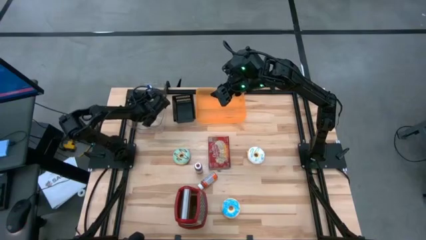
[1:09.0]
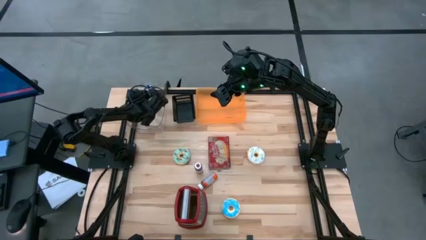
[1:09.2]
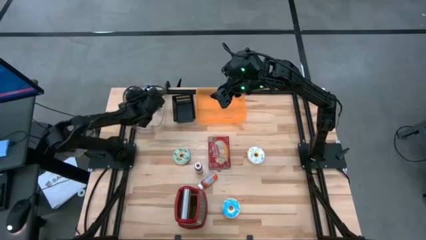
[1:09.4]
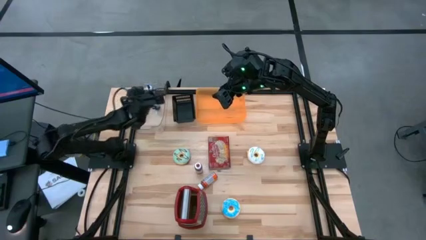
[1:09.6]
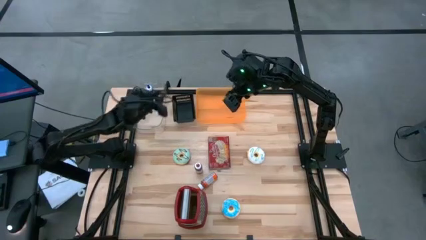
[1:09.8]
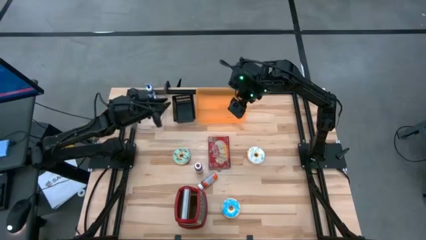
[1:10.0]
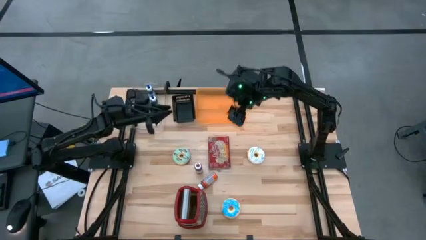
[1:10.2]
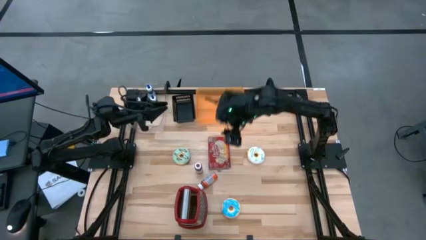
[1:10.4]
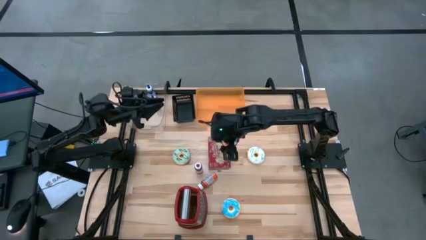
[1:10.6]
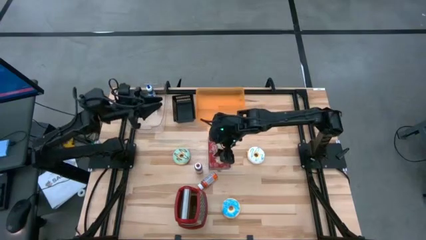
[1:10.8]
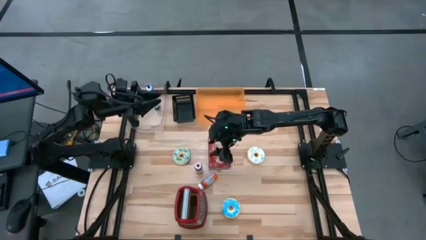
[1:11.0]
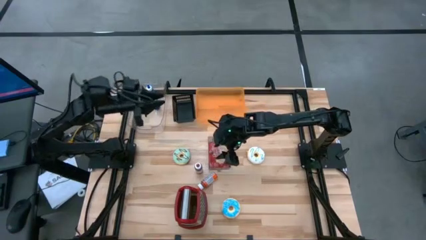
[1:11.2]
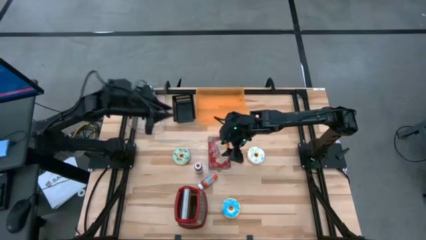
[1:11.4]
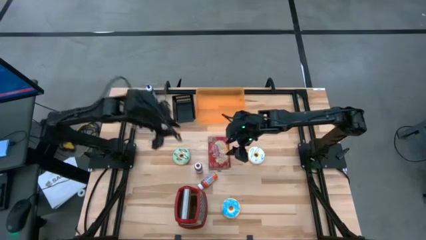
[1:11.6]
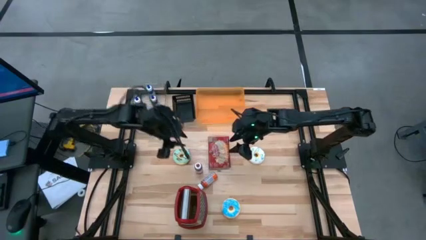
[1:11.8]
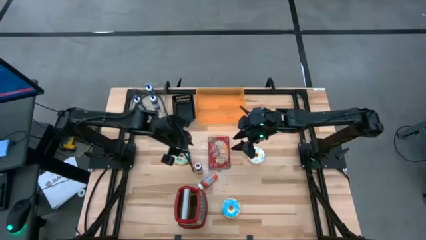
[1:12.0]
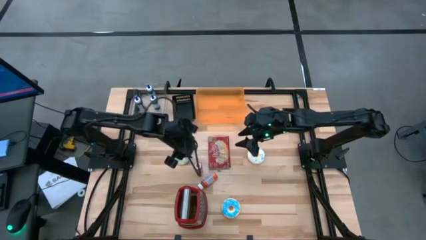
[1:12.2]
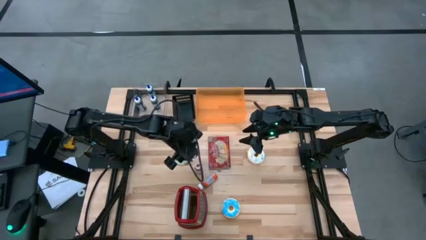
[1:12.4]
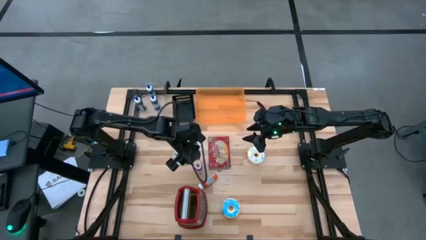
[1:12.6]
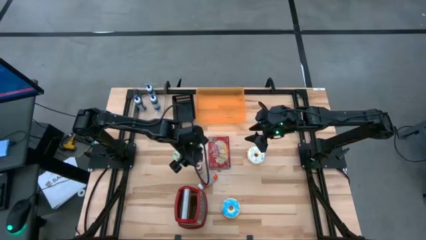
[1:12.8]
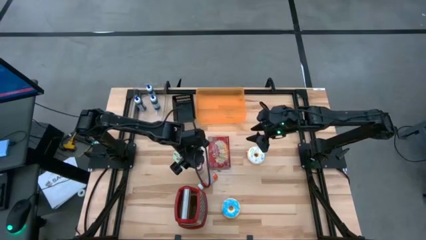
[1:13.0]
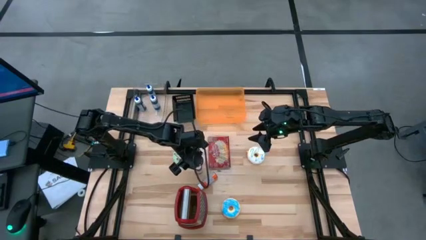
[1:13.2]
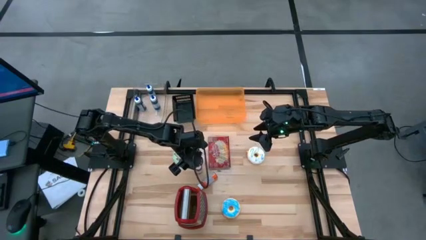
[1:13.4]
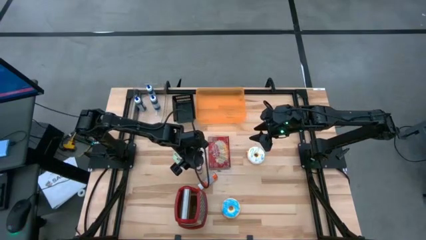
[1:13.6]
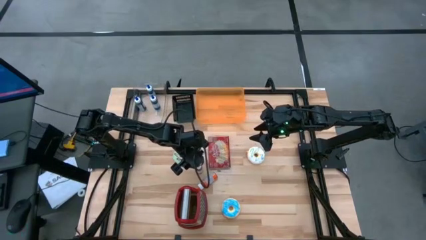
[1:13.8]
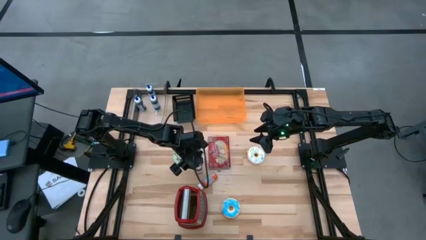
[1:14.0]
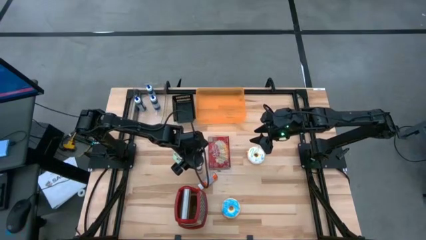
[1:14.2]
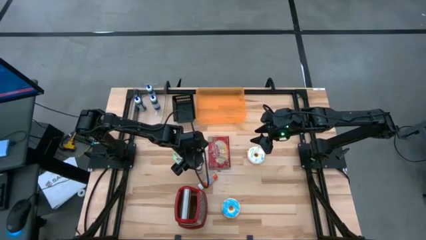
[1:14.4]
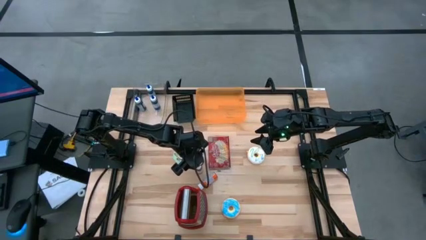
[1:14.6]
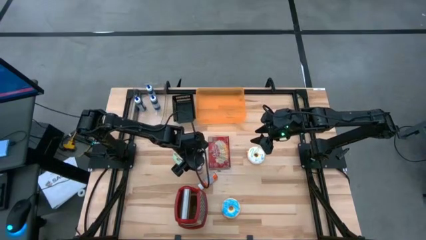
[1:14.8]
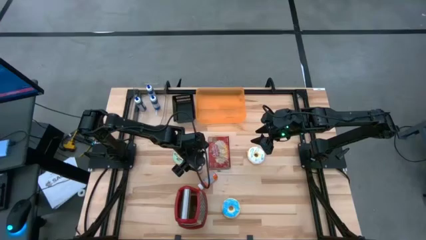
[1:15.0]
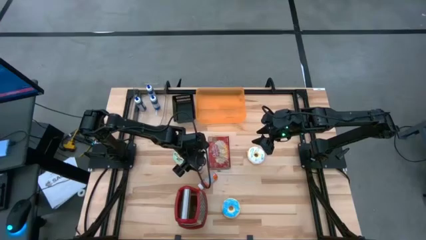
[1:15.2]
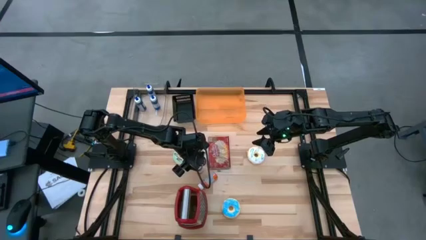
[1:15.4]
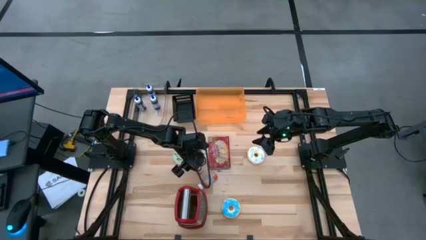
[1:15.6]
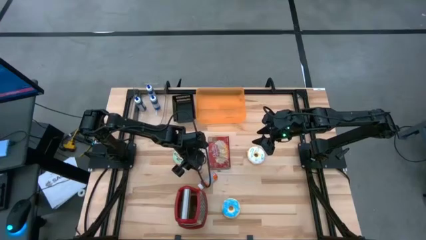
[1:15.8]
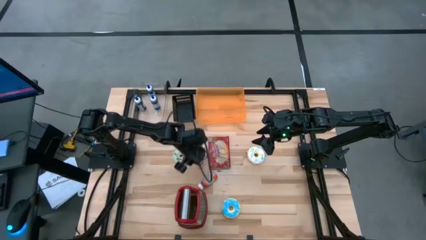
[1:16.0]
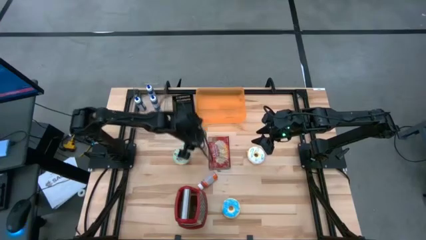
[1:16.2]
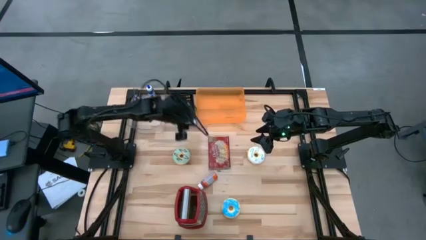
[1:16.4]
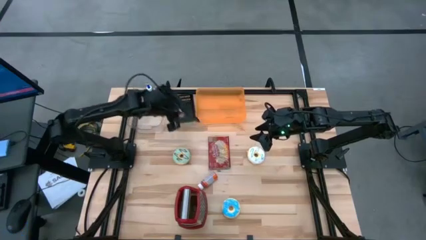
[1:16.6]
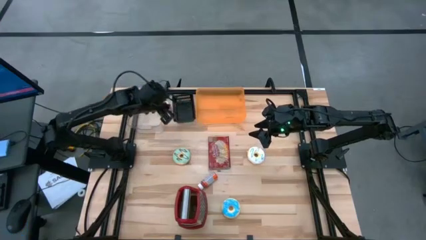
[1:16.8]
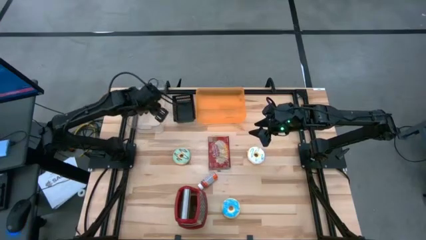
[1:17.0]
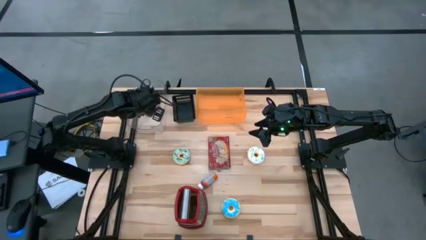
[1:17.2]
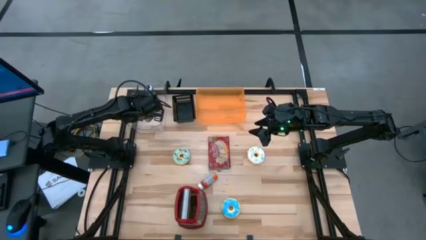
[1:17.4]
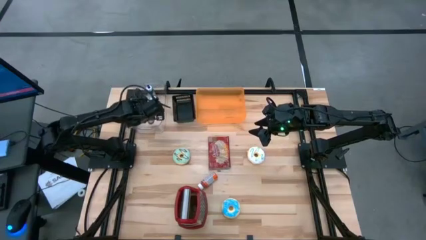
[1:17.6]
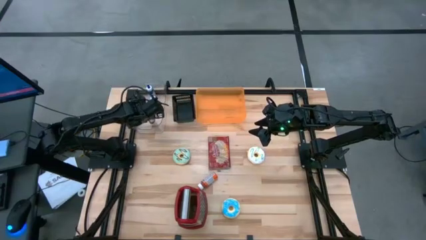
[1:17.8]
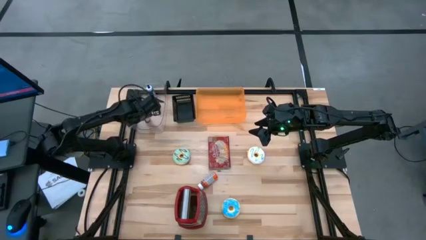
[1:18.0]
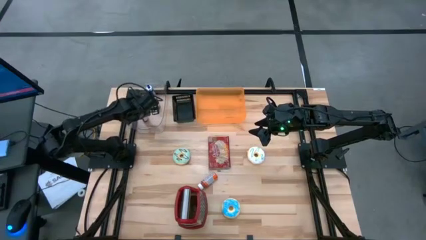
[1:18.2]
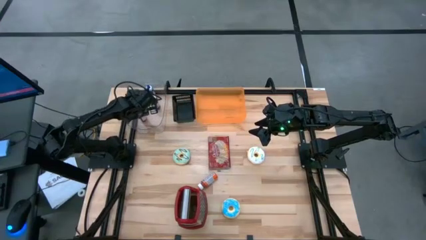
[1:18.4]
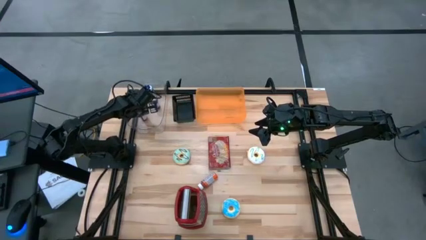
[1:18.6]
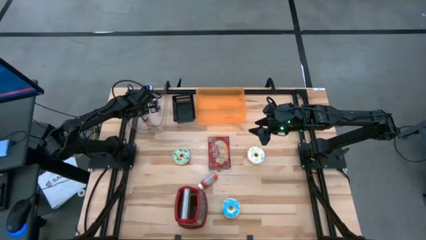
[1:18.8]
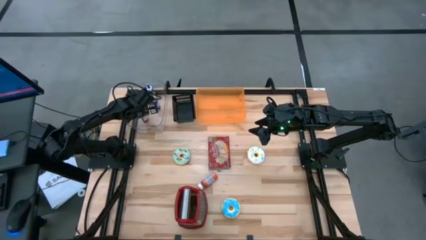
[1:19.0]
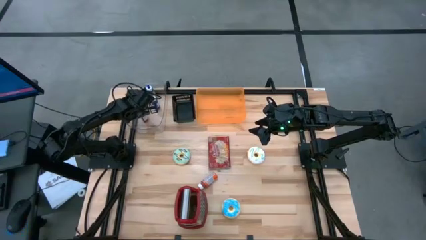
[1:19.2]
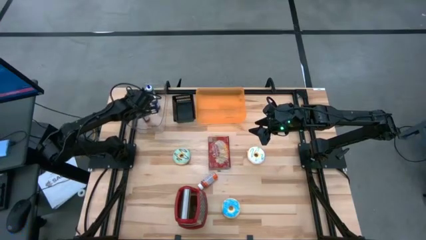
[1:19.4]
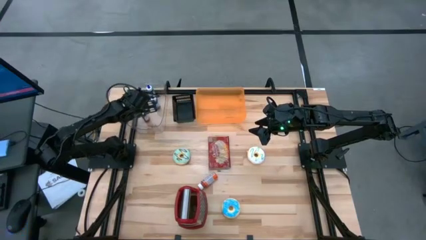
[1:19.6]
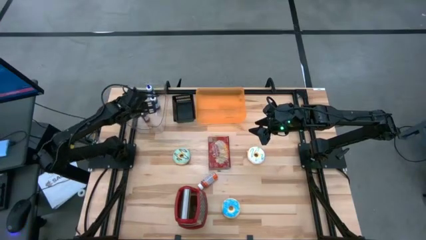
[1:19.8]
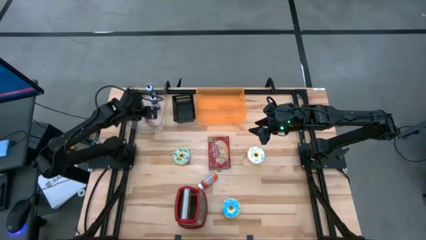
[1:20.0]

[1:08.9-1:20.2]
Put the red food coloring bottle into the transparent bin

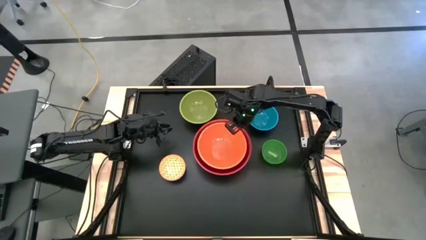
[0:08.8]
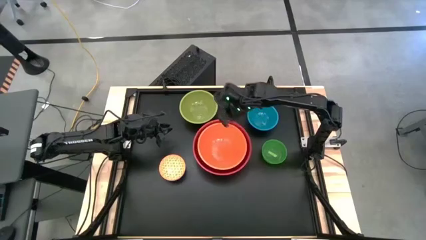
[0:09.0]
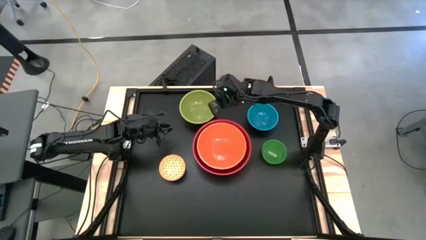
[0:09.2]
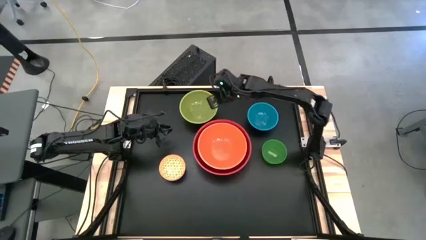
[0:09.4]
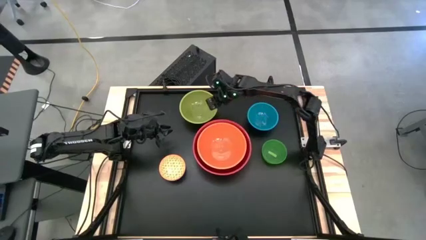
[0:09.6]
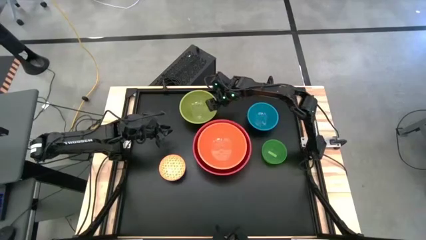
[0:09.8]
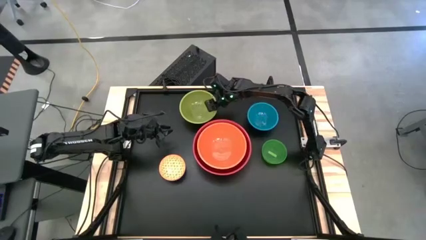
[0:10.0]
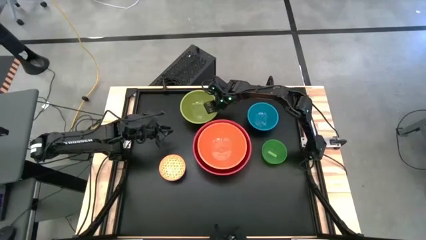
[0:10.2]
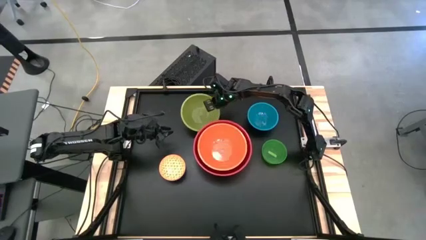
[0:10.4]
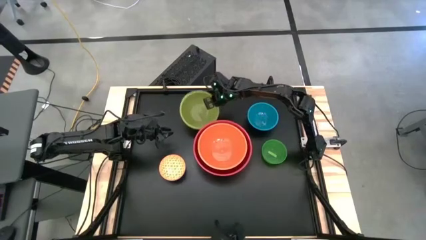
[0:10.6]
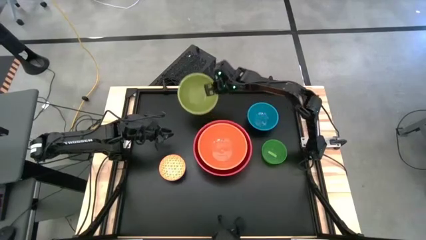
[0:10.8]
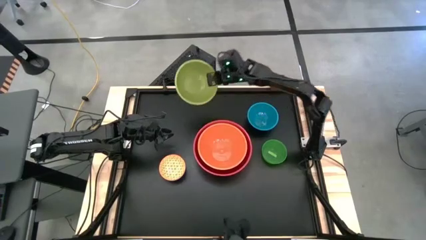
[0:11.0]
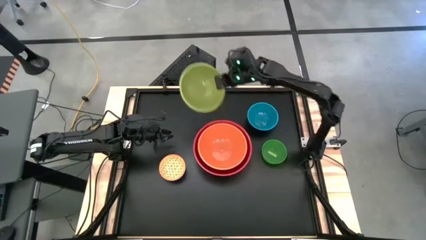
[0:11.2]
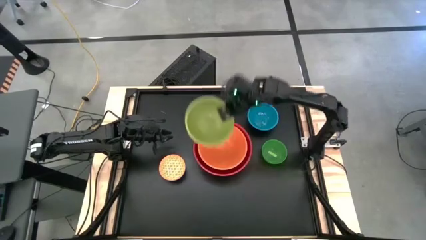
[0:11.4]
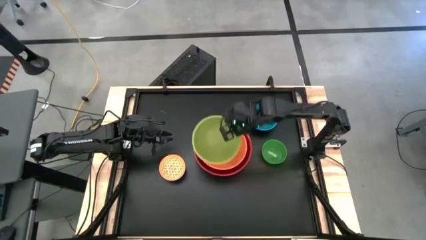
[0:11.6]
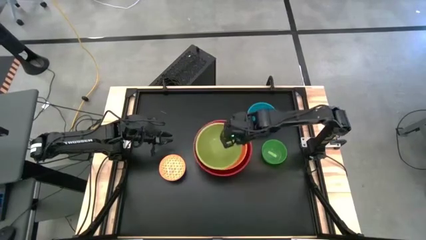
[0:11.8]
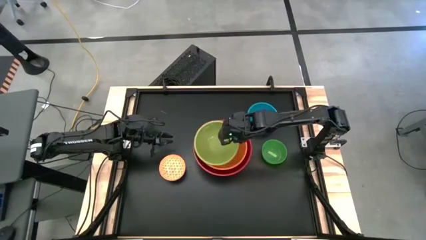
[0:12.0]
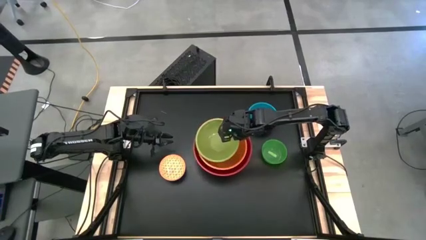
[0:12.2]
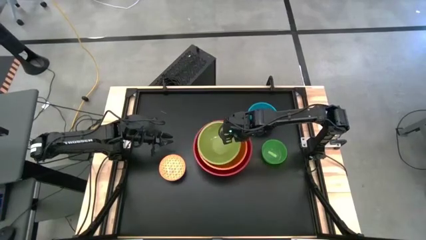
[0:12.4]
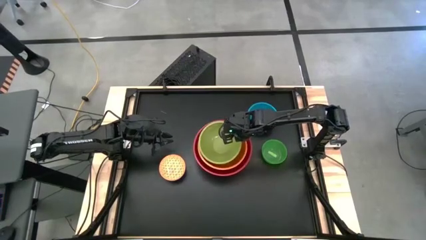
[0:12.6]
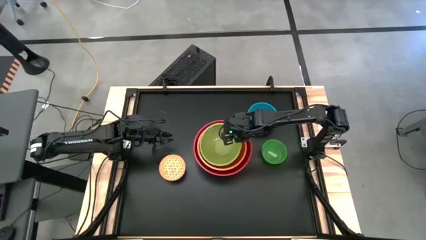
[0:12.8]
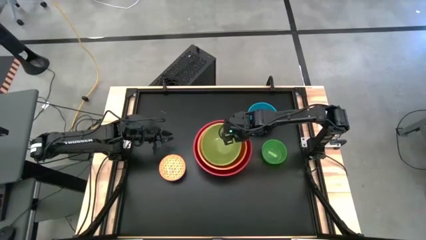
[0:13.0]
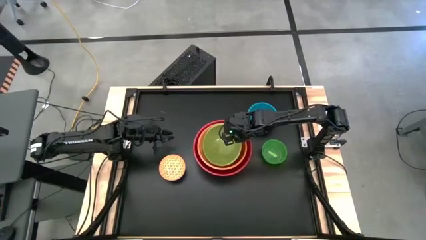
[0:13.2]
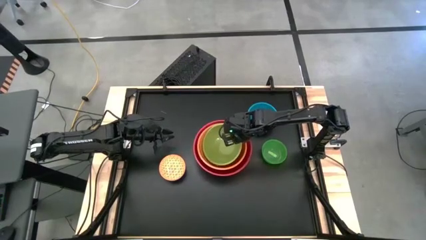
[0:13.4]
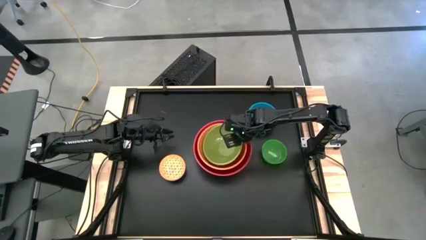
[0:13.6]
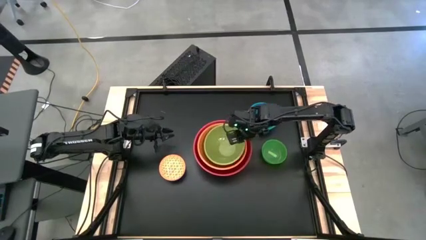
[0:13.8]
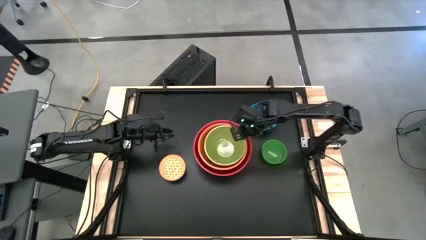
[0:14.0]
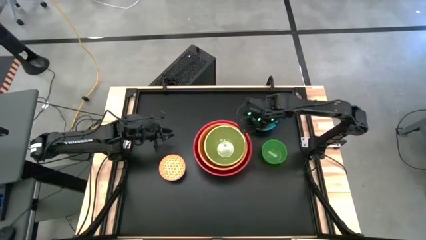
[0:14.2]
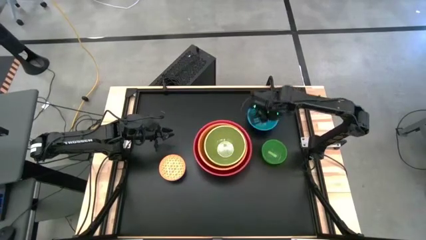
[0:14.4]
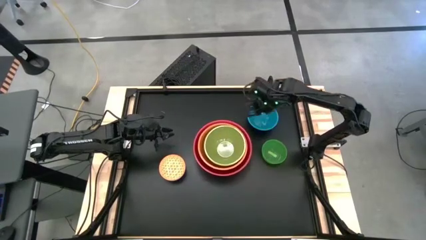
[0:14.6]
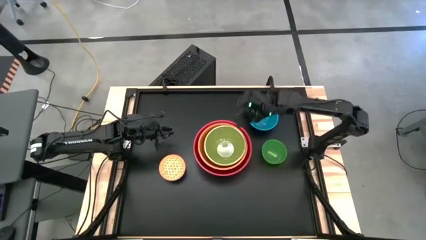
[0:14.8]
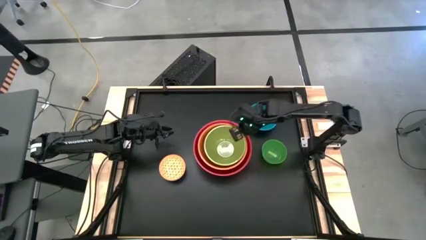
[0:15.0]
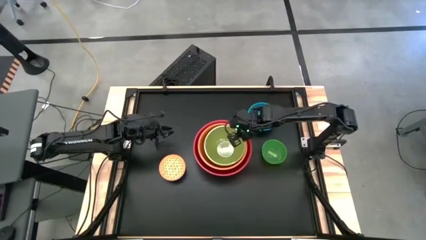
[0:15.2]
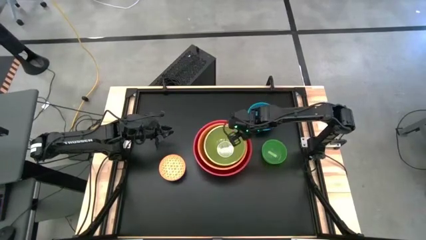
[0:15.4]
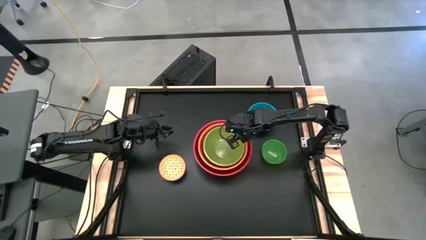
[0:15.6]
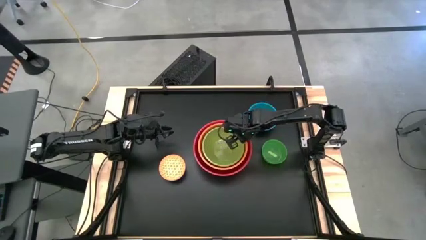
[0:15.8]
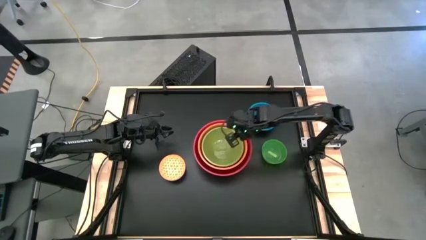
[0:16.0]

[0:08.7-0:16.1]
Stack the light green bowl on top of the orange bowl
